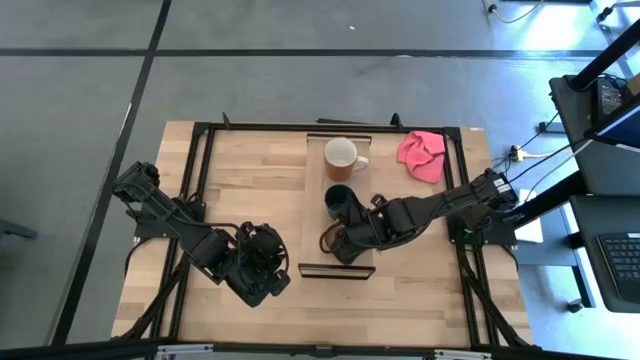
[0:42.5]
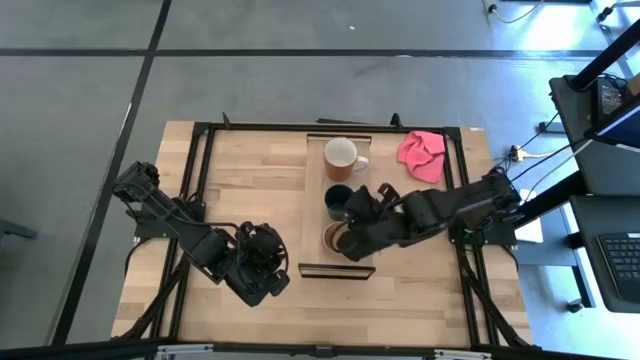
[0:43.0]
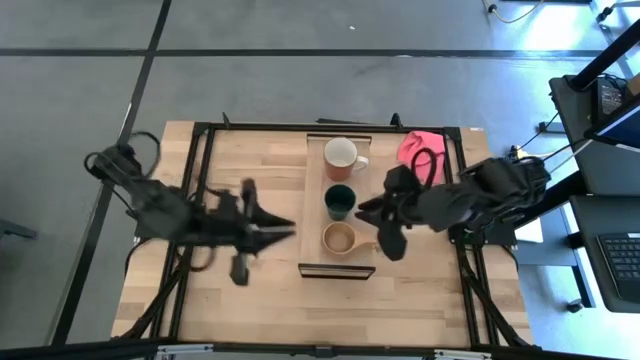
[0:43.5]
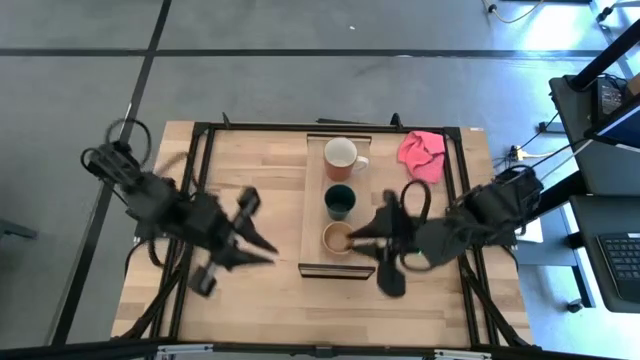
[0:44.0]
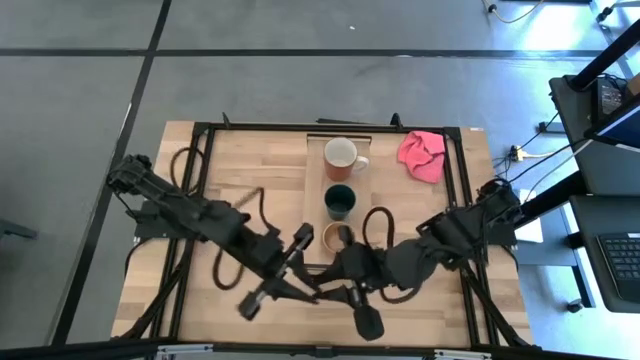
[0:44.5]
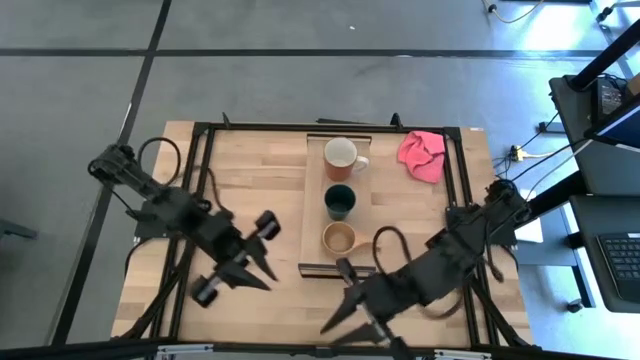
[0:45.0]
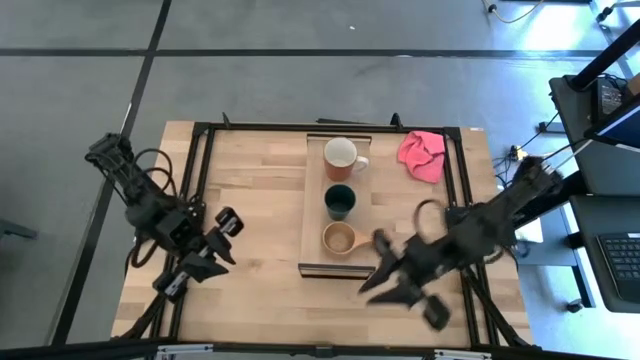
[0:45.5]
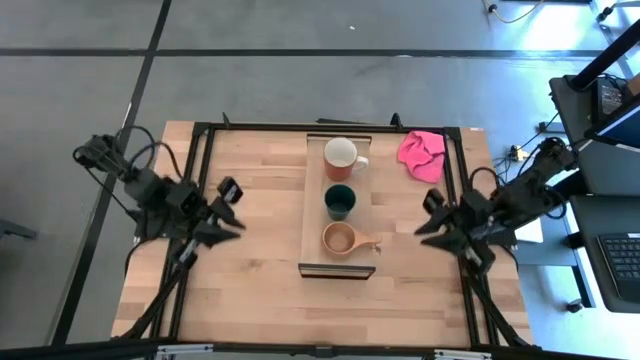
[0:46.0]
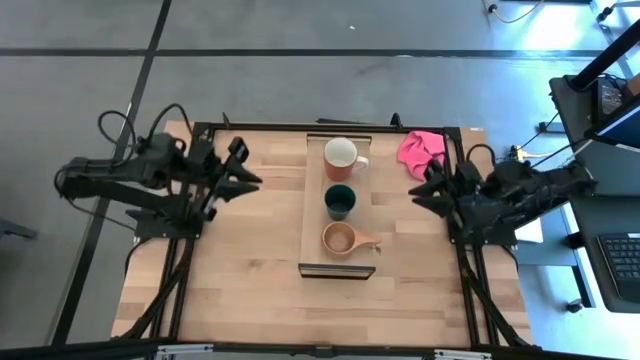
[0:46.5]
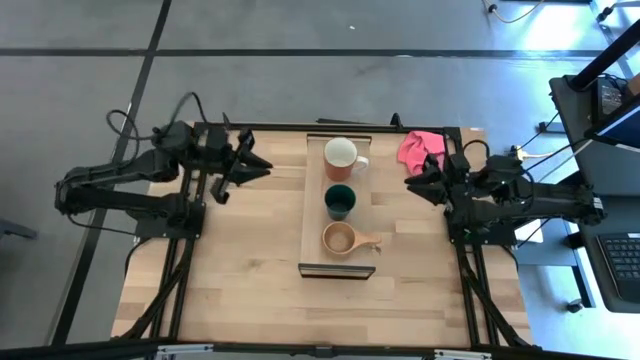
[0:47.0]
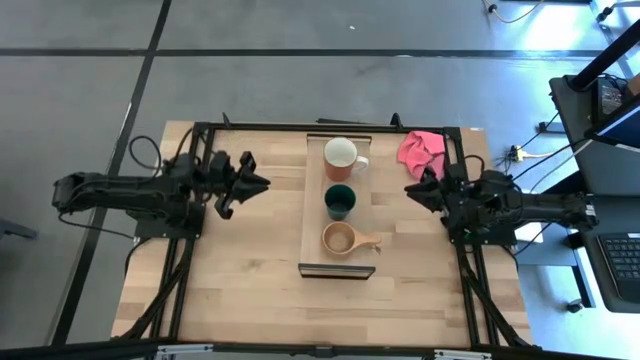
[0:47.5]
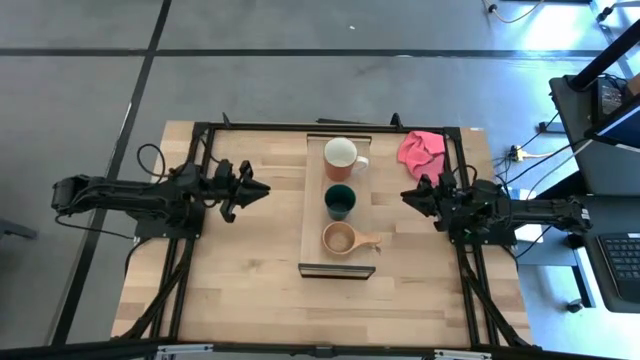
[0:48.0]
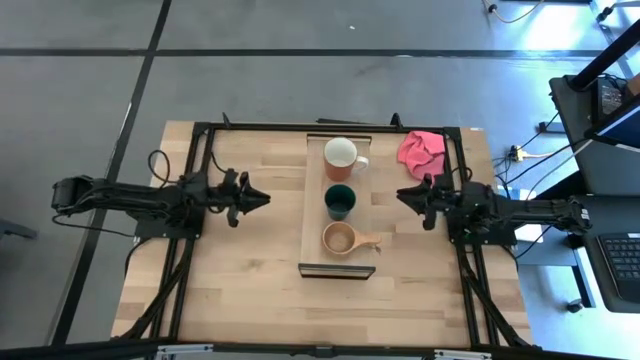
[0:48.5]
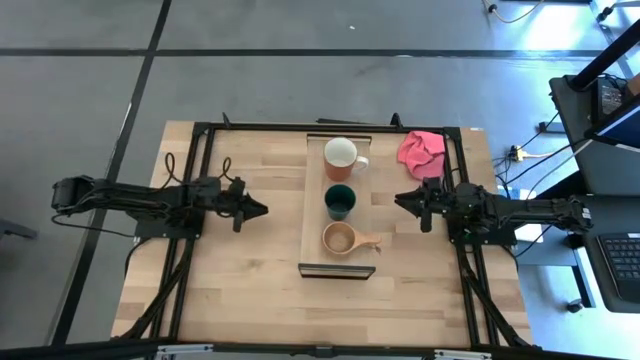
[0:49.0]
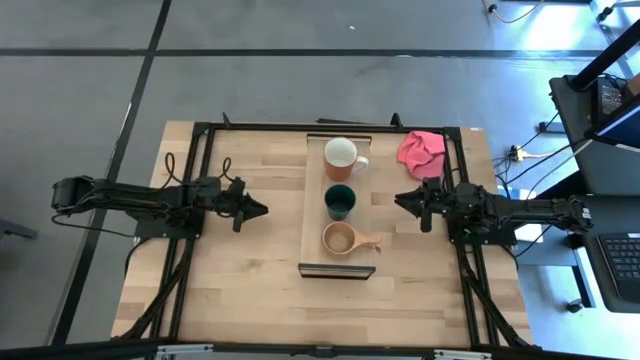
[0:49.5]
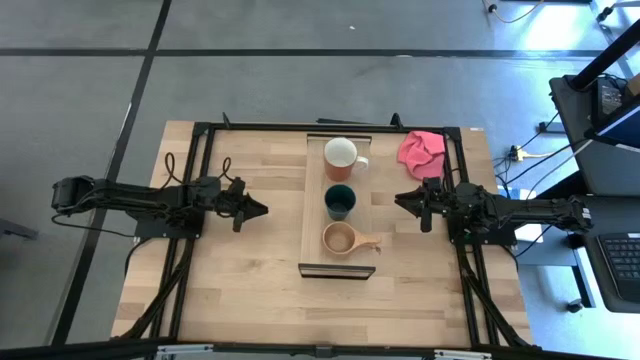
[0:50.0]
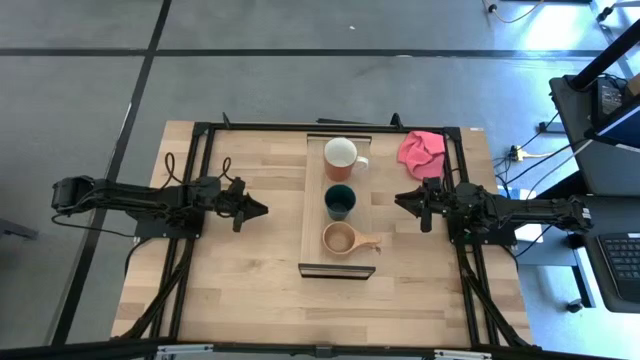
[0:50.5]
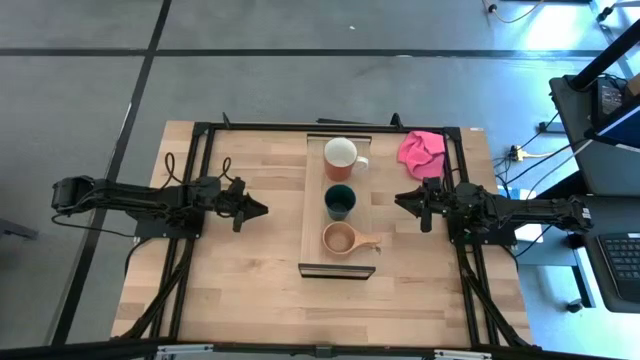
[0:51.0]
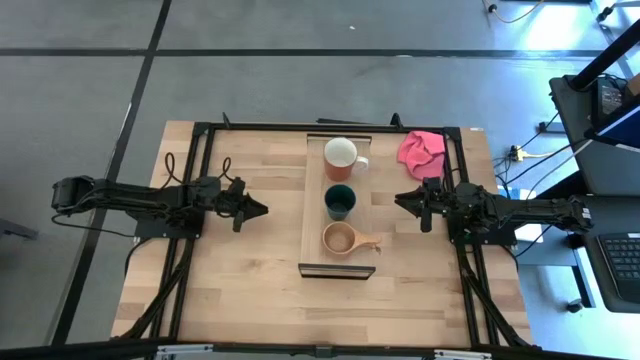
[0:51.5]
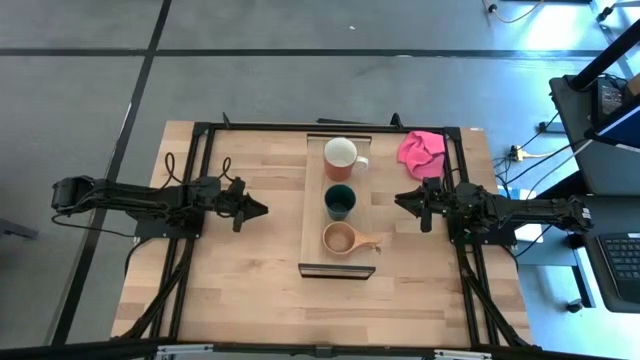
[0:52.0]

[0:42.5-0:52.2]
Task: Stack small to large cups/mugs on shelf
Return to Home Position

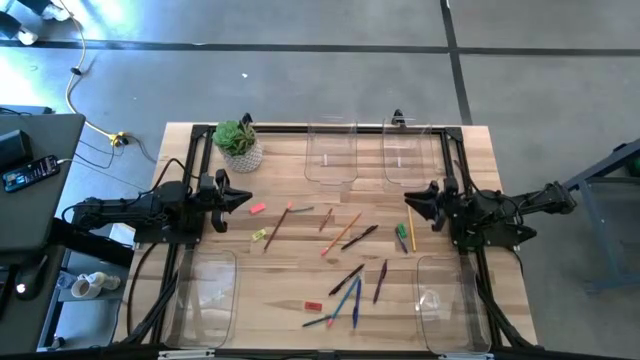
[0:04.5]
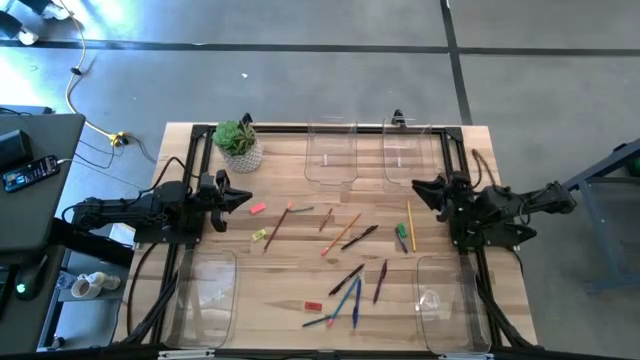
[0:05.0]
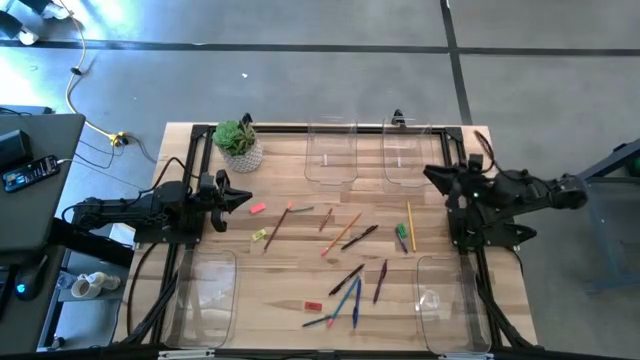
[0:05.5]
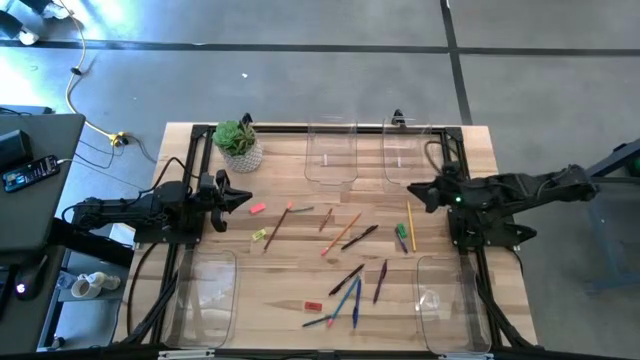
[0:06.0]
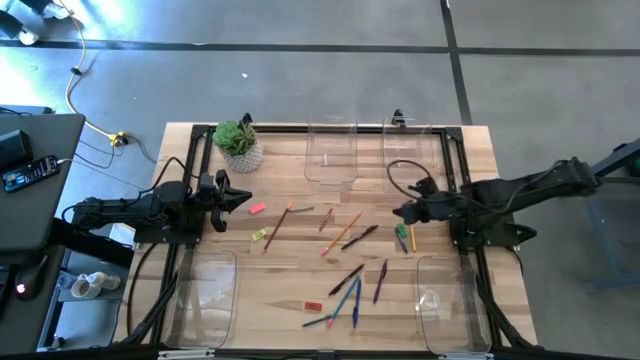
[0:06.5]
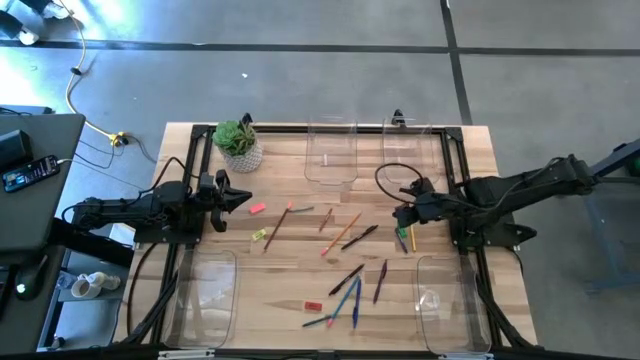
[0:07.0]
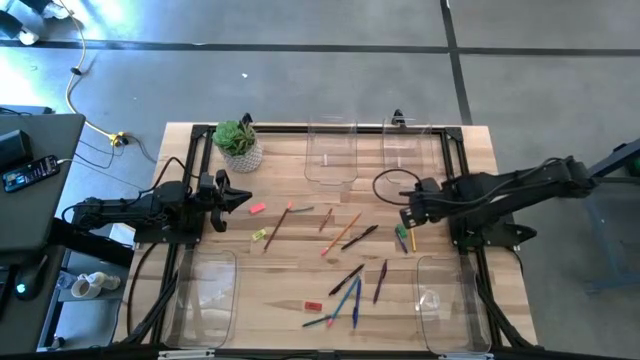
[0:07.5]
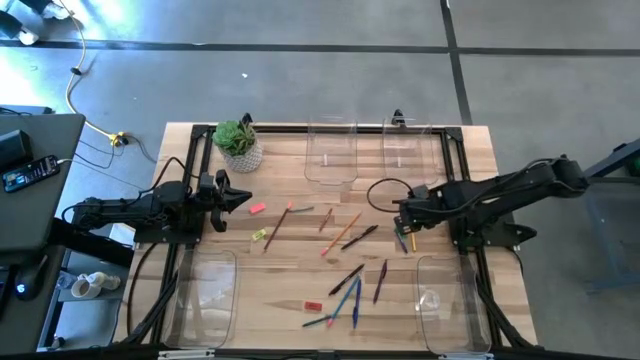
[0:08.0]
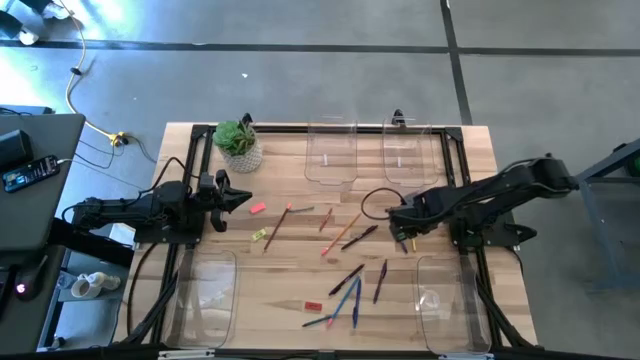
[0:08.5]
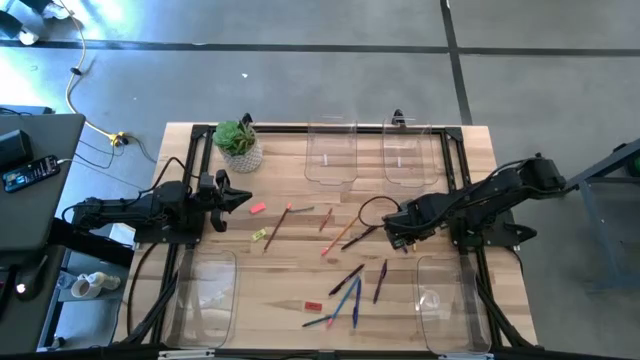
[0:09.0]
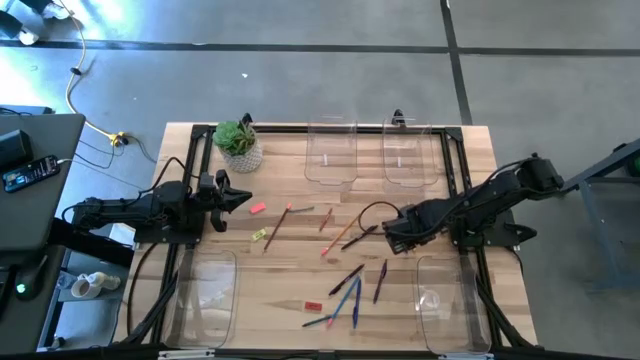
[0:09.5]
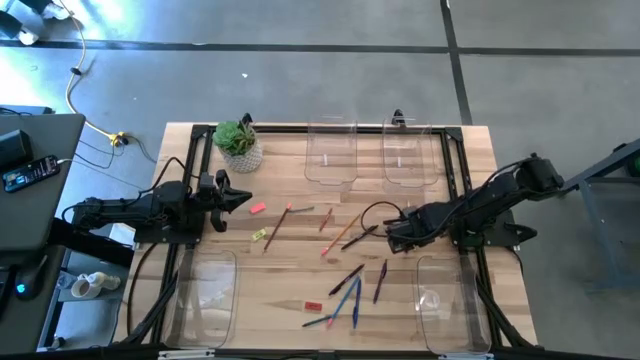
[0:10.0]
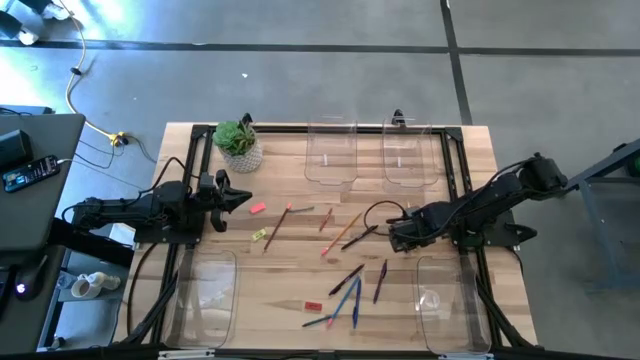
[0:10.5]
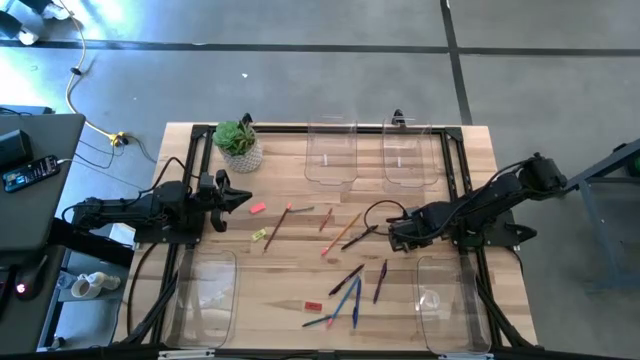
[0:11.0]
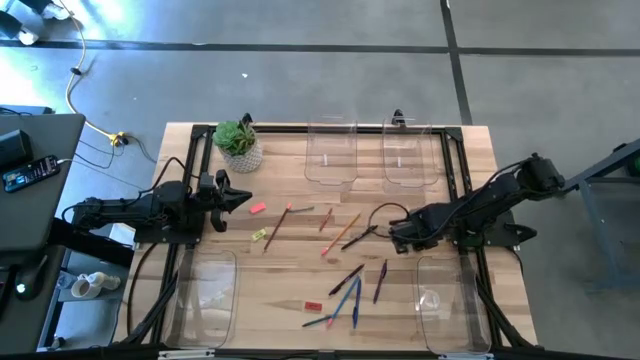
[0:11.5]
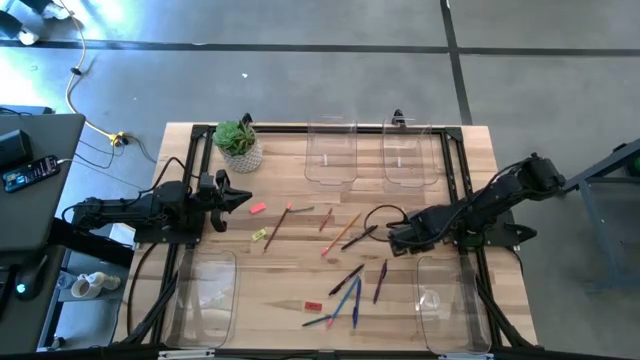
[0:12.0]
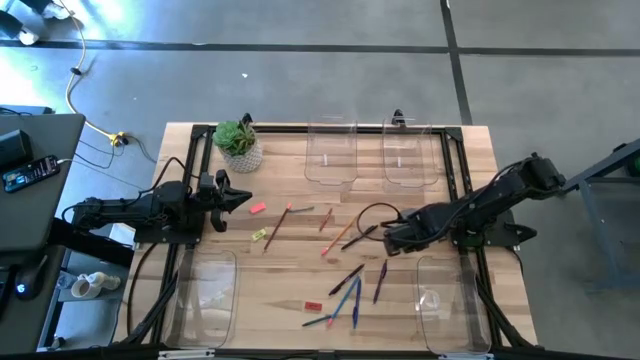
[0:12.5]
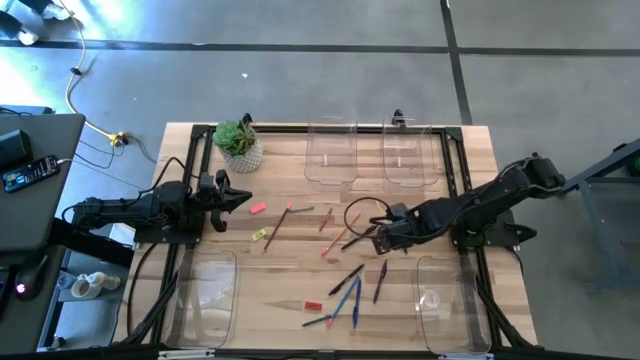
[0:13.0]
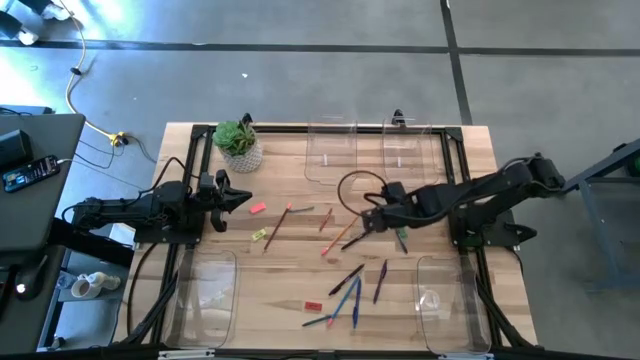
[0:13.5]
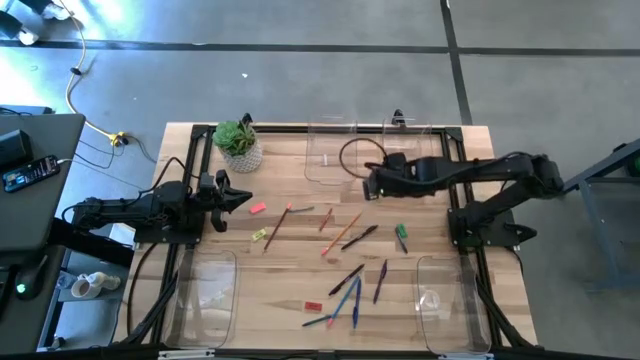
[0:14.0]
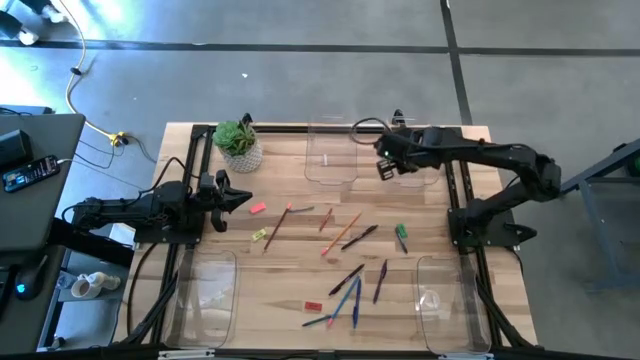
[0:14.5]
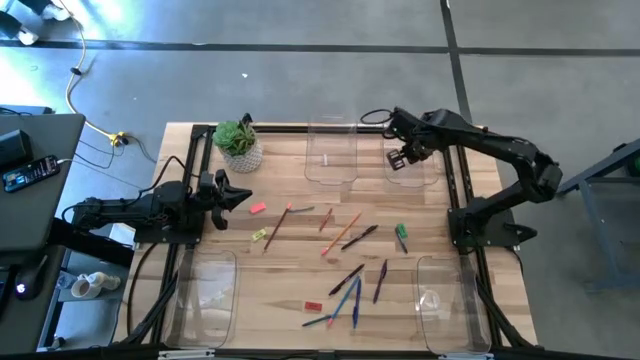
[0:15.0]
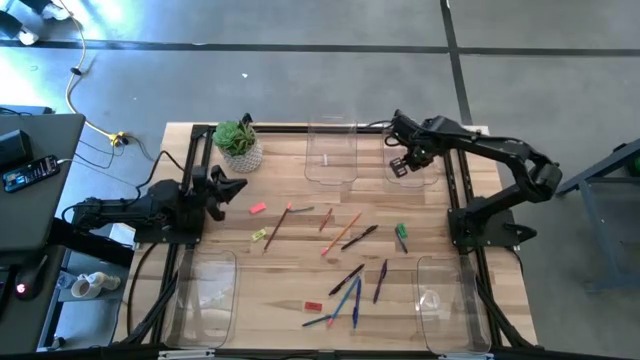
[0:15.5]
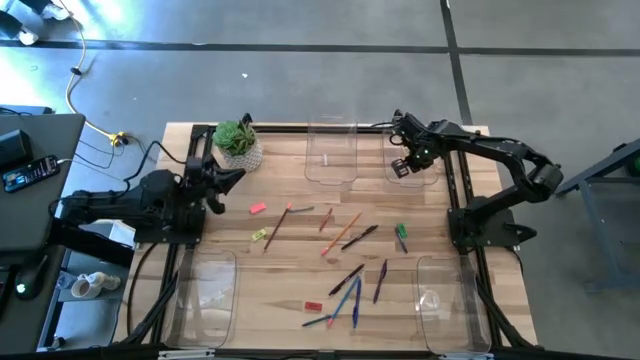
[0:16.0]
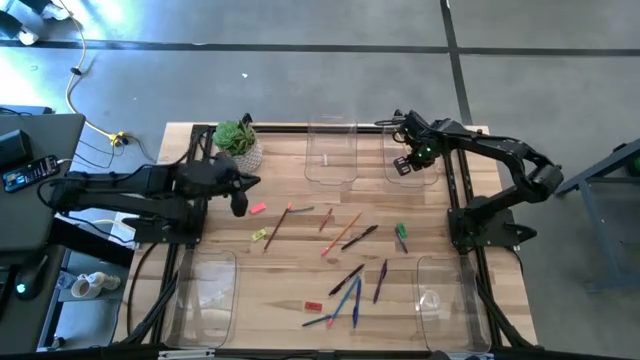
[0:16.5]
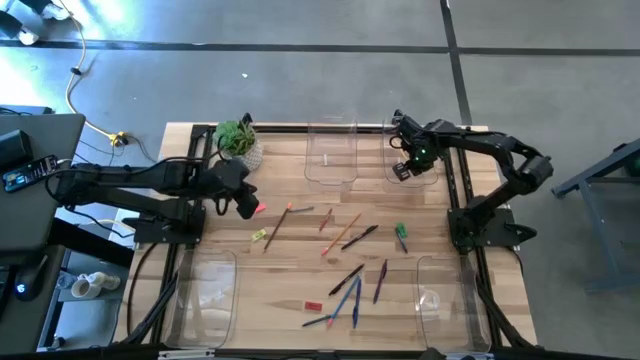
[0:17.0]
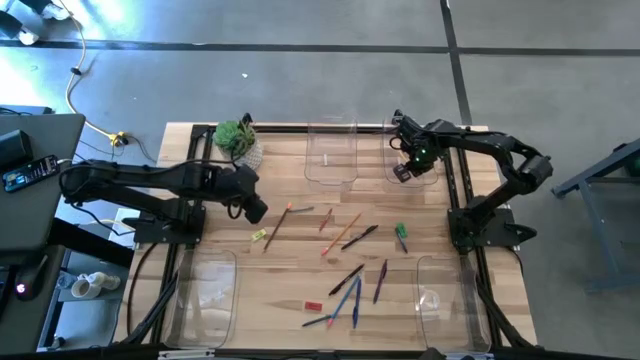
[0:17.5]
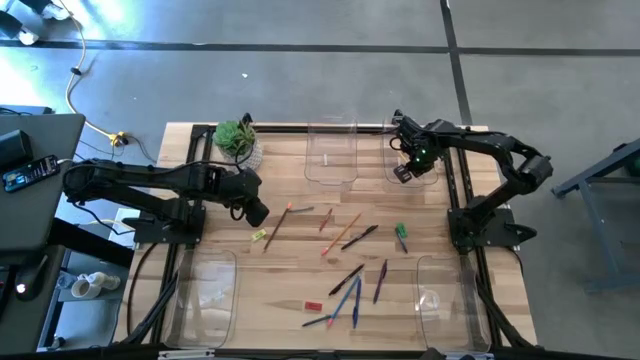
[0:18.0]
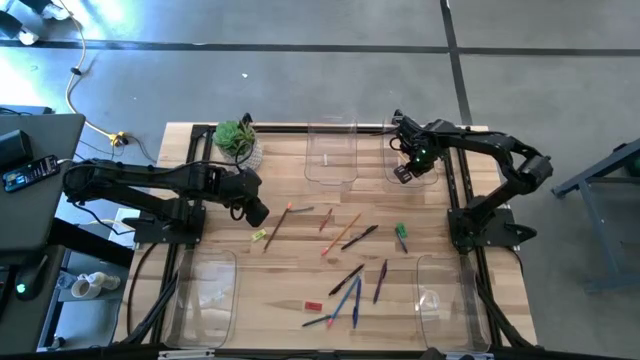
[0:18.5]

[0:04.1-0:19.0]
Task: Sort crayons/erasers/pens/pencils in bins
Put the yellow pencil into the top right transparent bin
